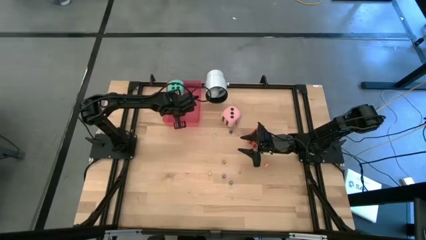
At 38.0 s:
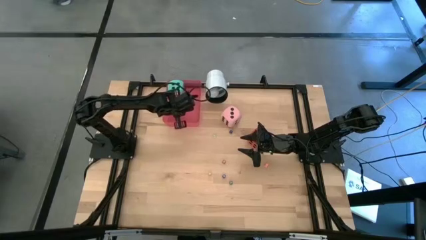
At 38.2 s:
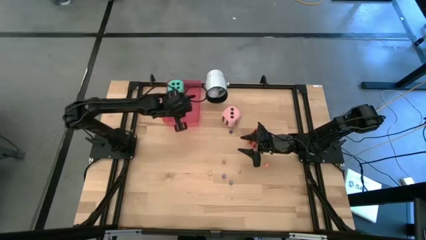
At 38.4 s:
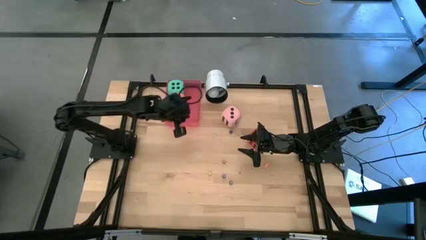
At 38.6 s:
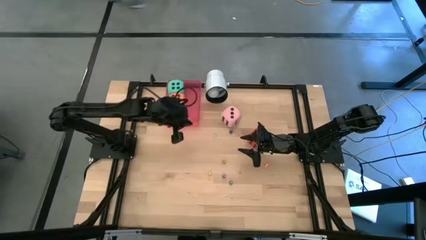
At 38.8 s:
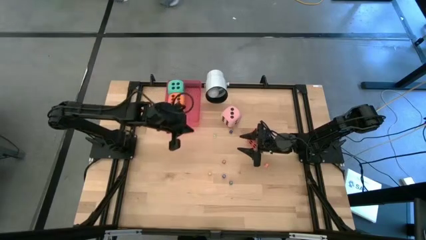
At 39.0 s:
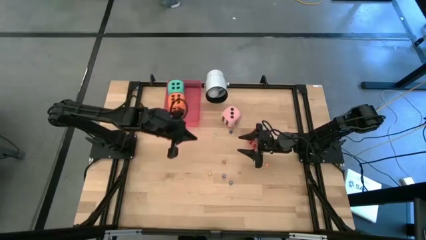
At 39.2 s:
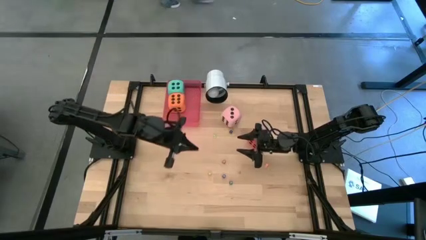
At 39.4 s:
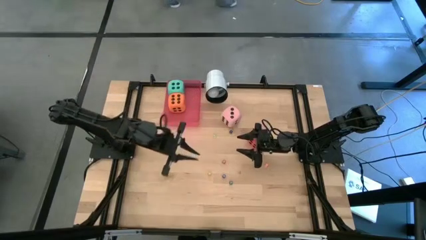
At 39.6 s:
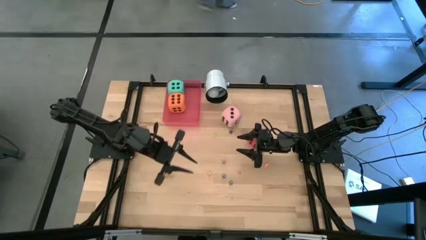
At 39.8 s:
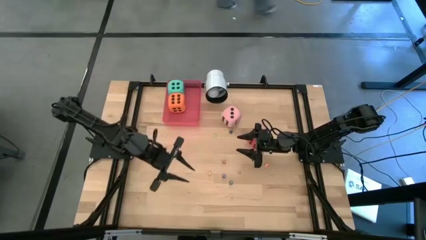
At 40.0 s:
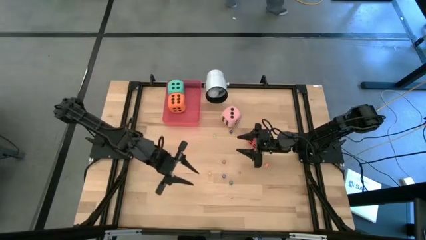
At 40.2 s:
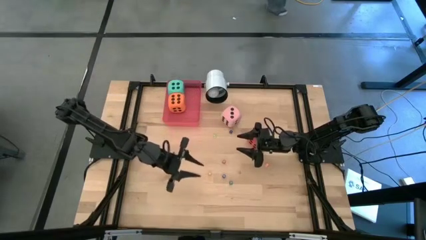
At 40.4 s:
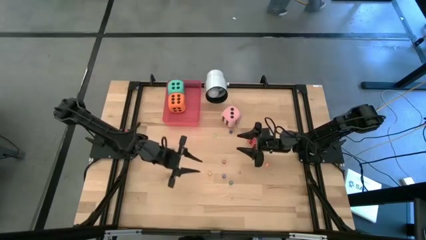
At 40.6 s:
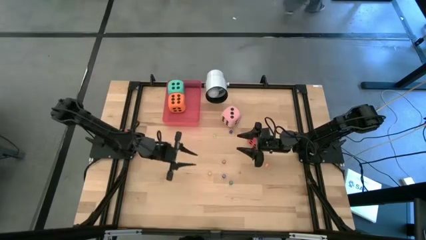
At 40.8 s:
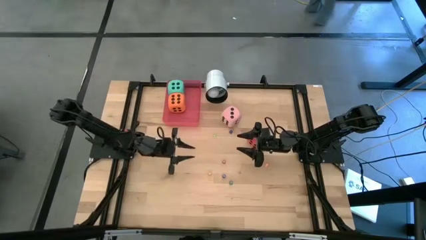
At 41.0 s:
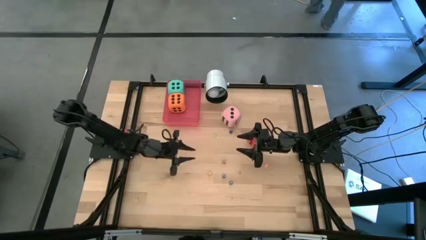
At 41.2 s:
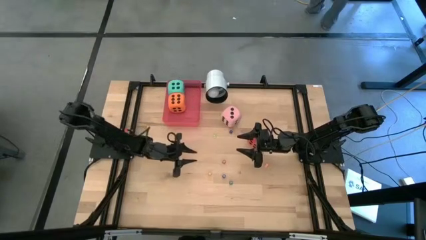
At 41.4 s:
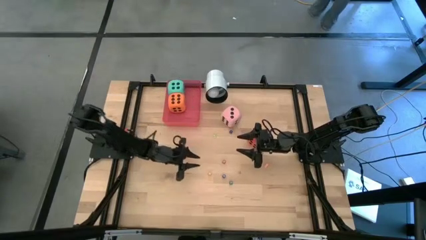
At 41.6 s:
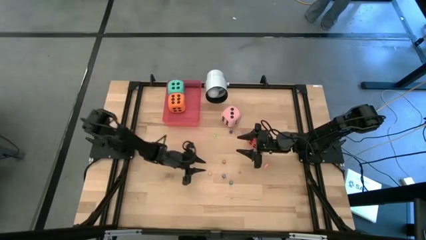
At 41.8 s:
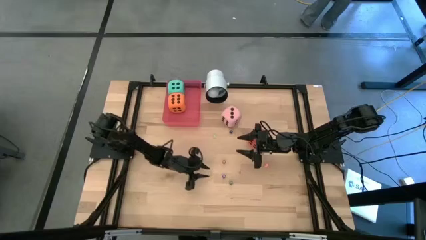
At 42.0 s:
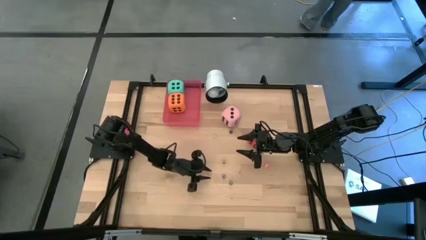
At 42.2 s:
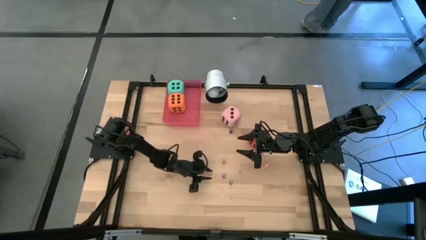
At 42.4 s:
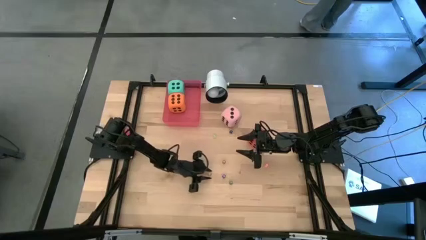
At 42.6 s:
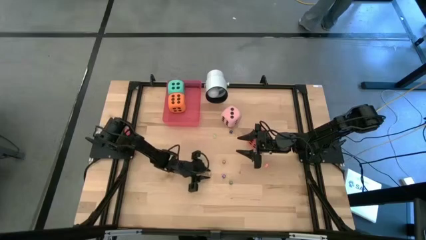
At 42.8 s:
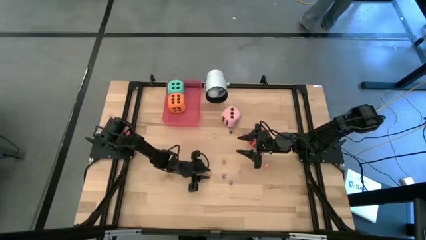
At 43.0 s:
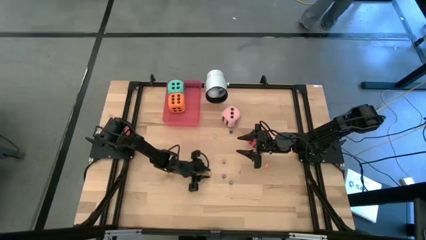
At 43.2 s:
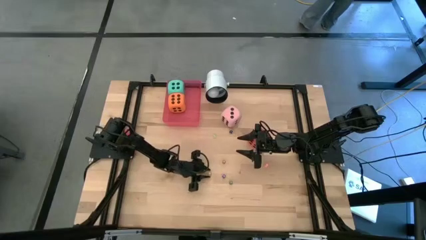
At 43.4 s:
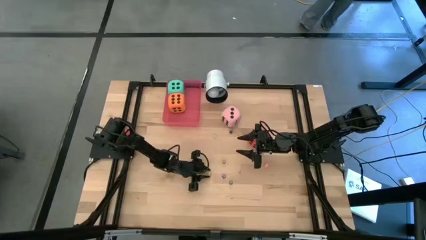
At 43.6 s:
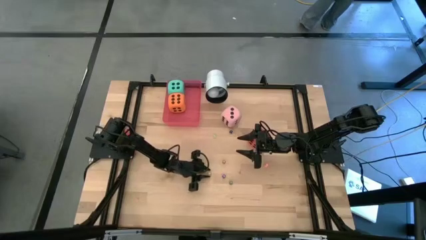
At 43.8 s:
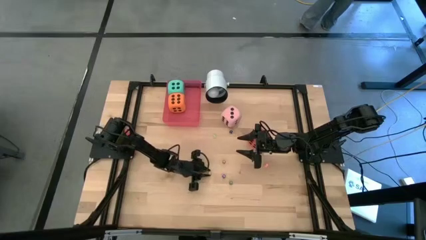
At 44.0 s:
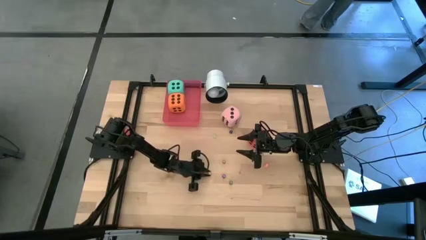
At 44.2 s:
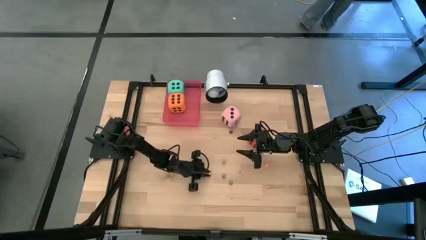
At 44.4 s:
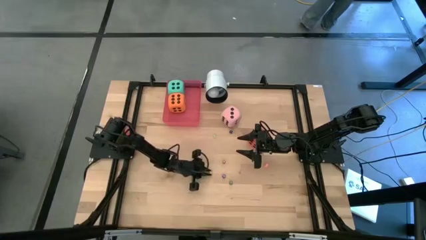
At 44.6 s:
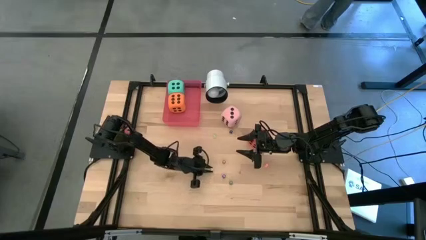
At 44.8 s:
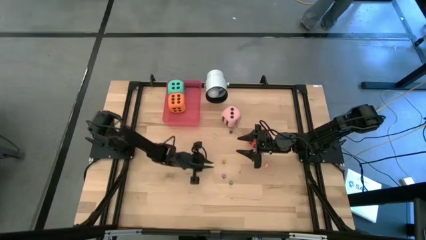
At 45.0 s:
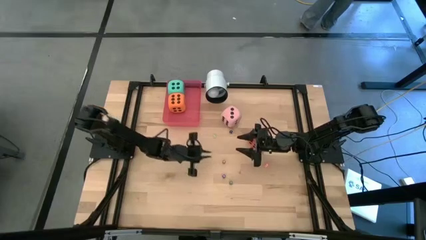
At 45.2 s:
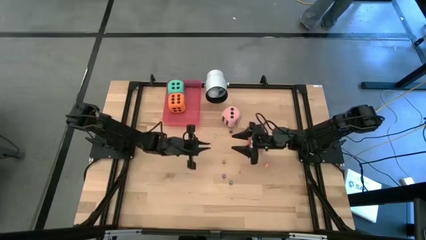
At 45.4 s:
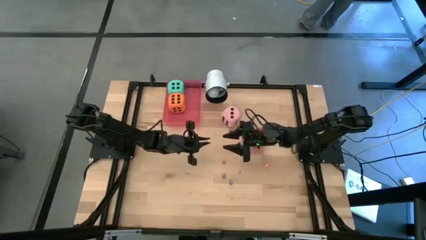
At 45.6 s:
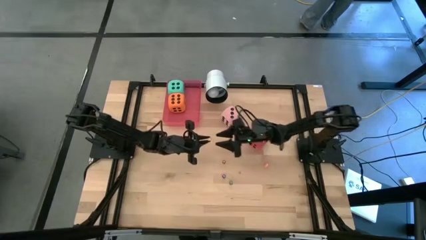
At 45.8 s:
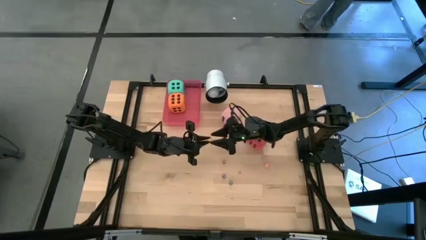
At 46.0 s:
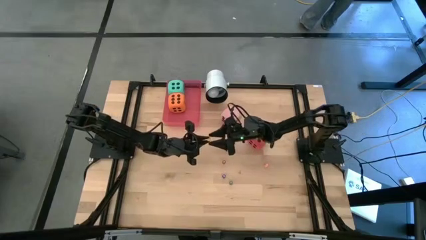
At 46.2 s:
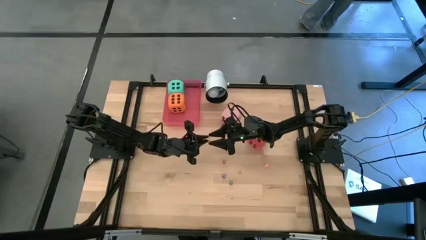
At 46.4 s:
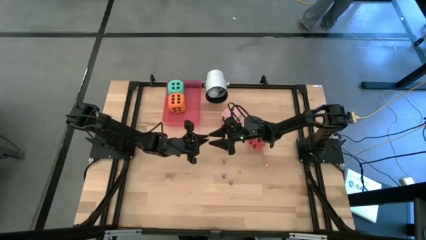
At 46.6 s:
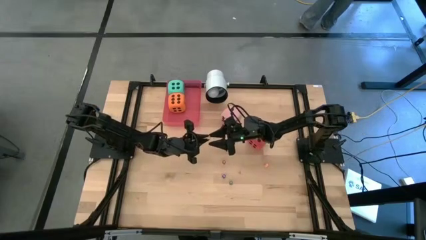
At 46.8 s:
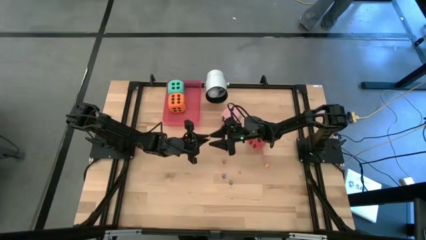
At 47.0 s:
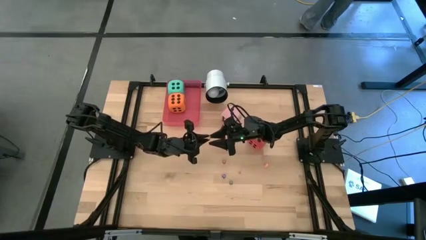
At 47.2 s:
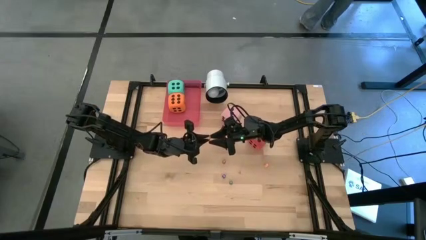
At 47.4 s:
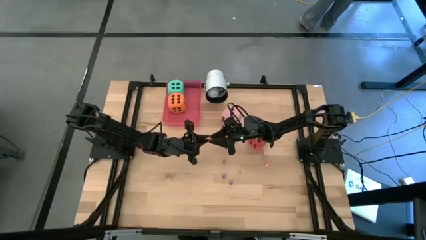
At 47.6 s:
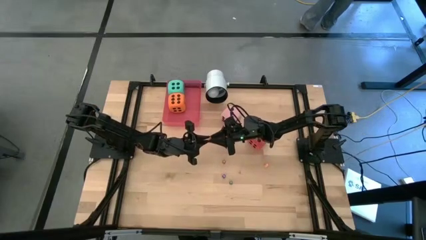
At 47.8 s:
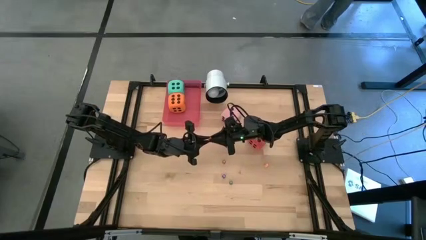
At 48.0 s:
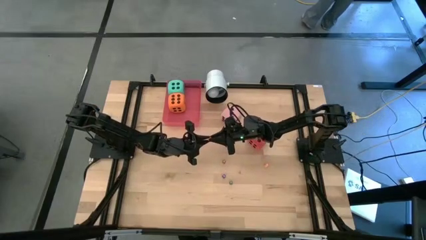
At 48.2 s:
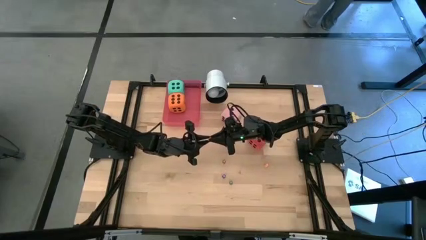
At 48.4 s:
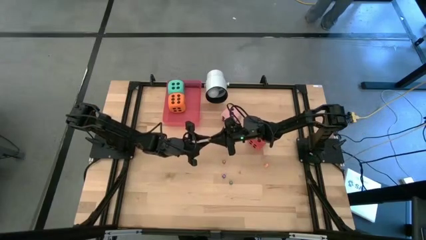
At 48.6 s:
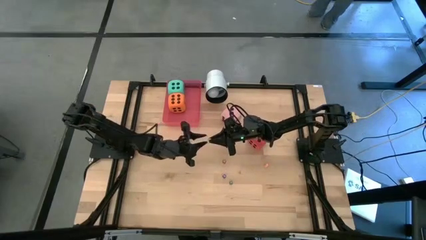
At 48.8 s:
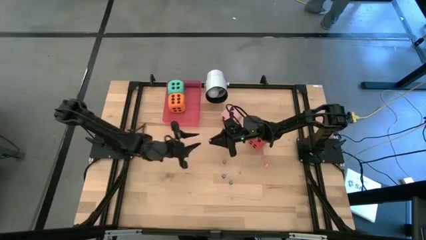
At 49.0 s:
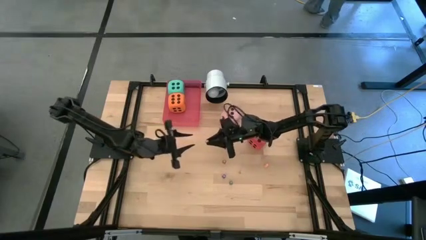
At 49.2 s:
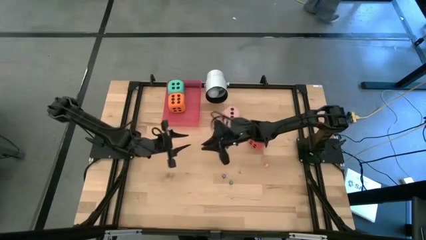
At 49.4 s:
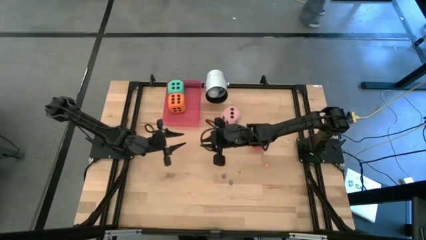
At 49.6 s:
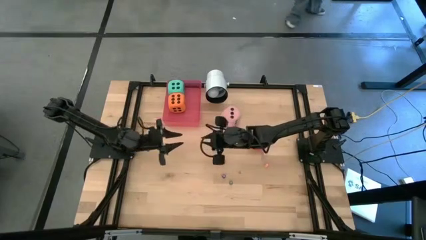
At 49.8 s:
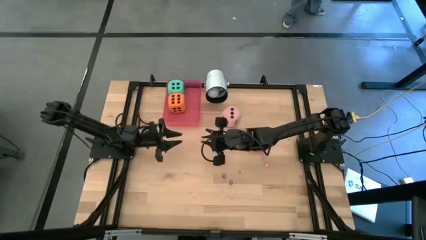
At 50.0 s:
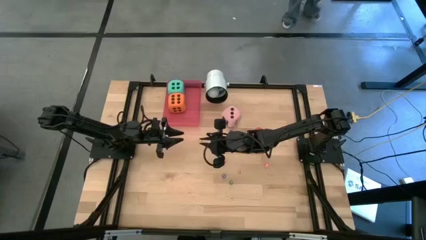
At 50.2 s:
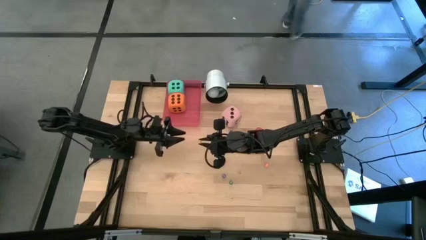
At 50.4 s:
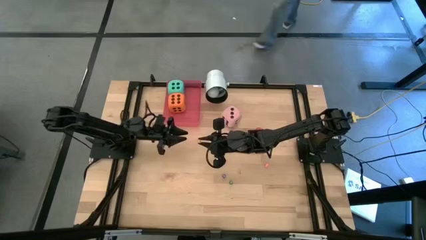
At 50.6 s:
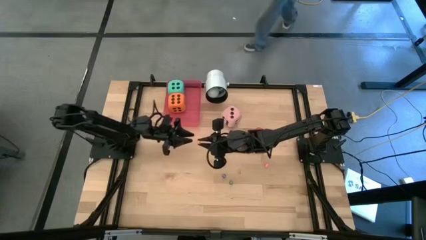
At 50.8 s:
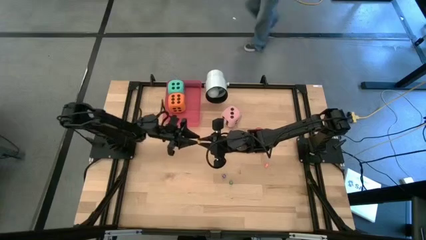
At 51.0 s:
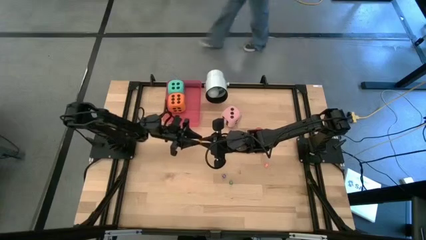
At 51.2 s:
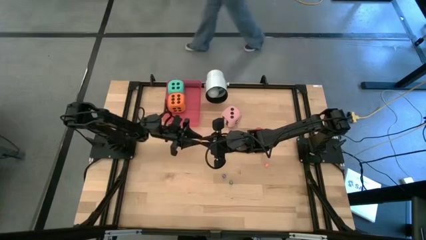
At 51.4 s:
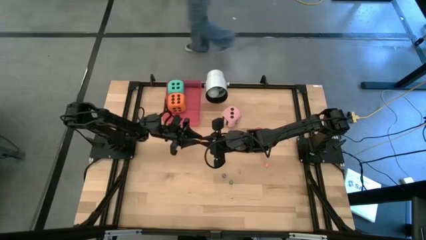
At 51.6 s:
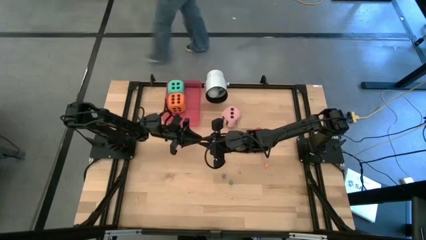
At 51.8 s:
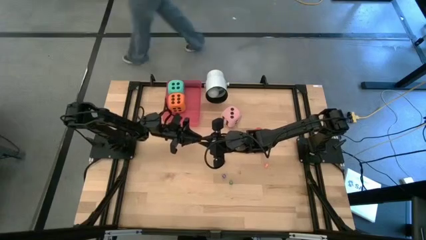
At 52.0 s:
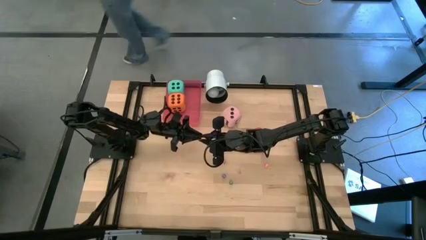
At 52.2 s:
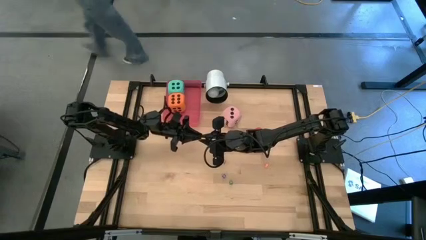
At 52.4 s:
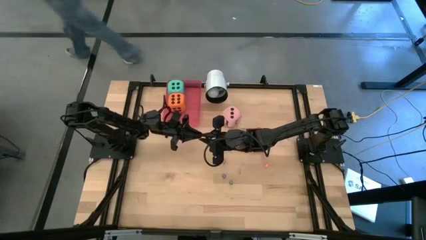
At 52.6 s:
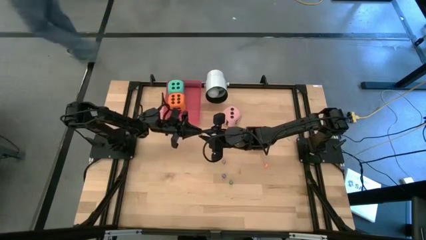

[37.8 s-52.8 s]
Task: Pick & Place Dice
Put the small yellow dice into the red bin
